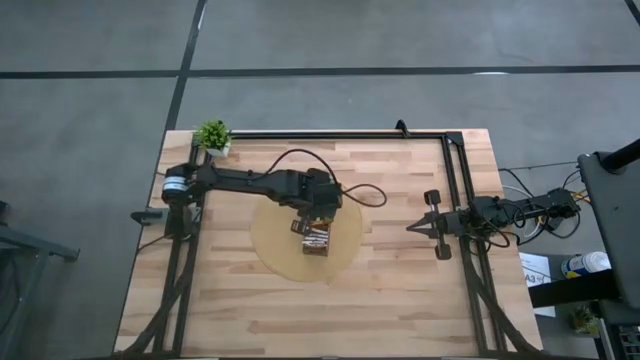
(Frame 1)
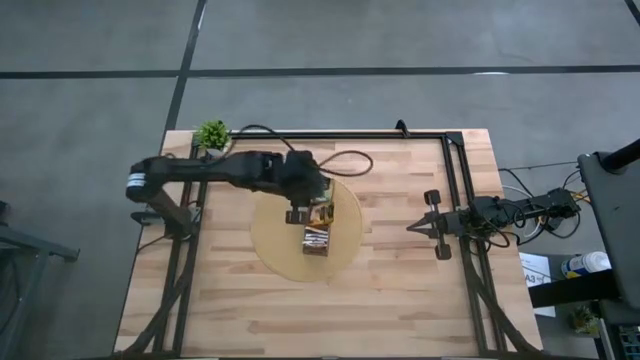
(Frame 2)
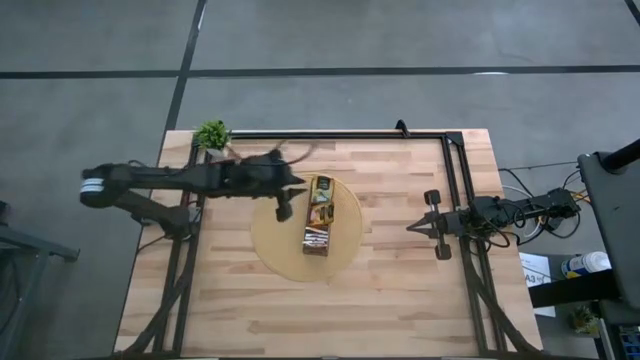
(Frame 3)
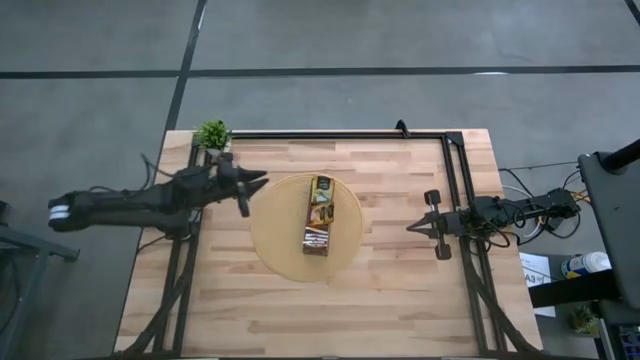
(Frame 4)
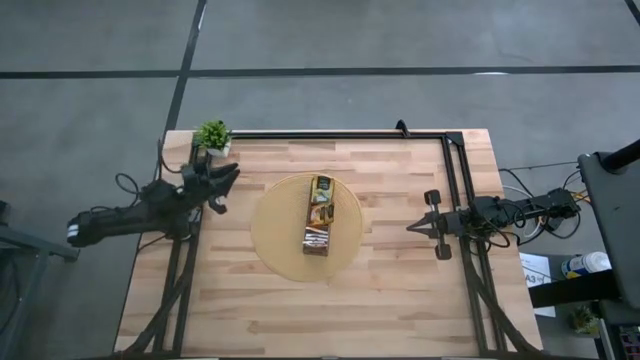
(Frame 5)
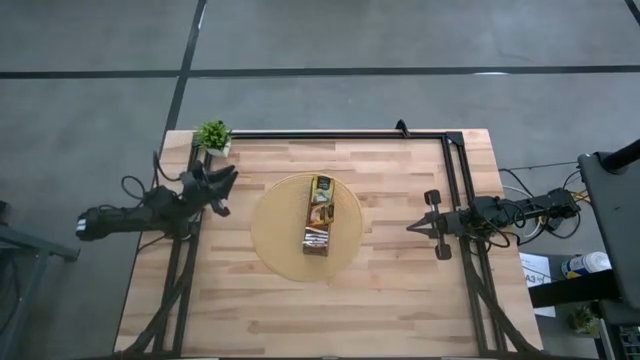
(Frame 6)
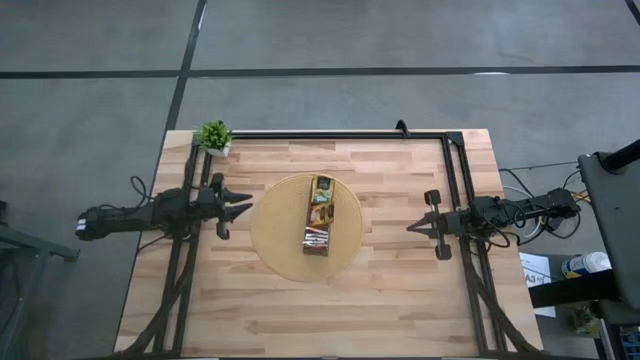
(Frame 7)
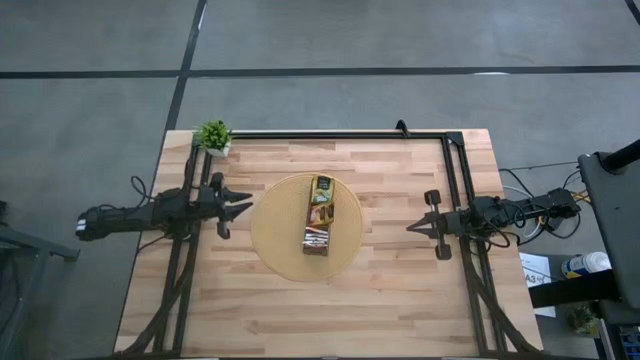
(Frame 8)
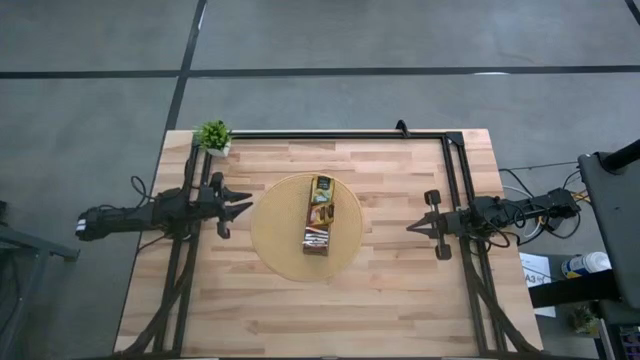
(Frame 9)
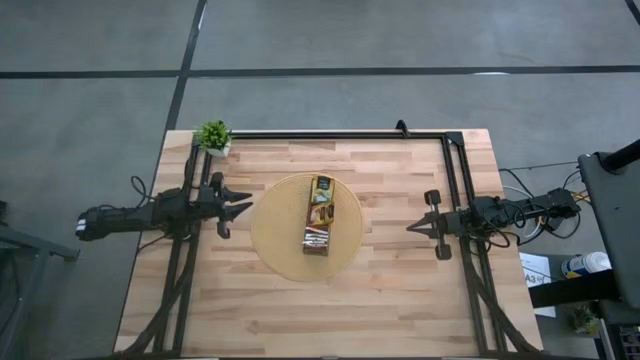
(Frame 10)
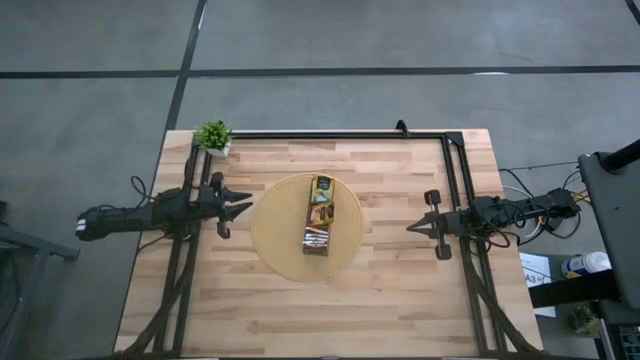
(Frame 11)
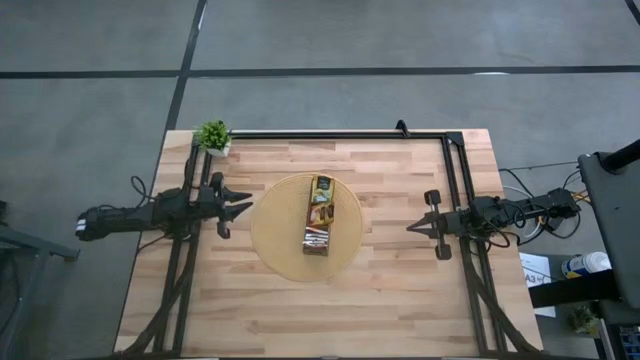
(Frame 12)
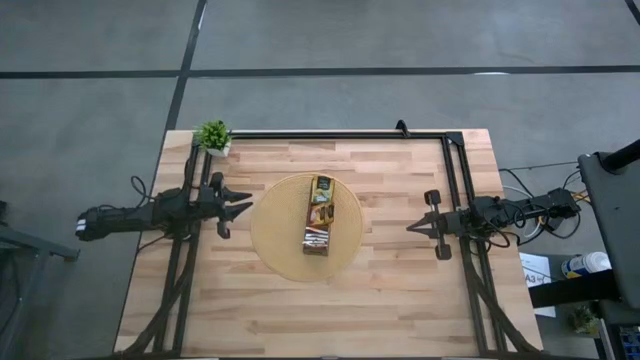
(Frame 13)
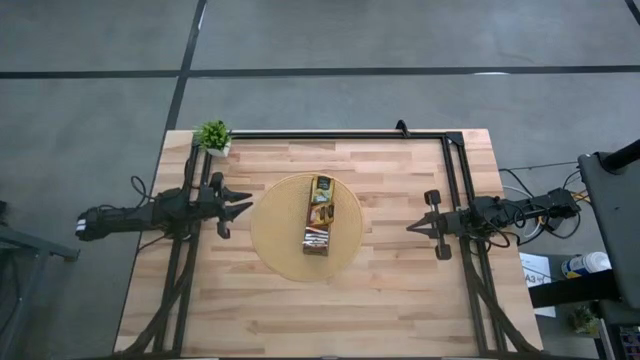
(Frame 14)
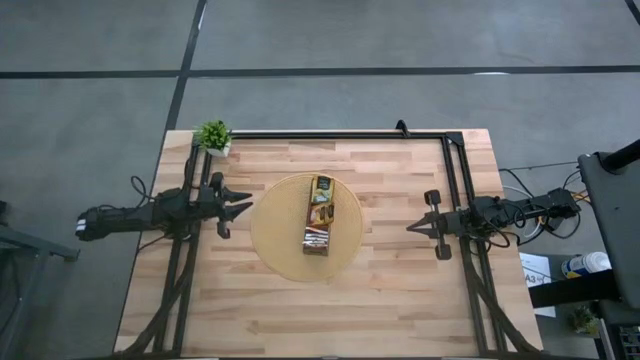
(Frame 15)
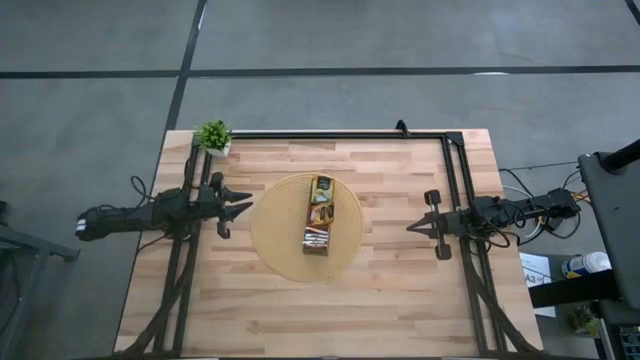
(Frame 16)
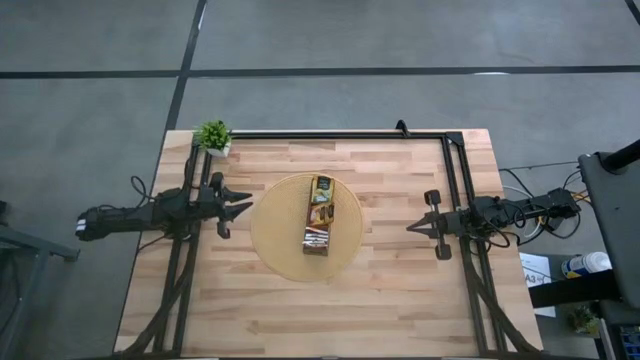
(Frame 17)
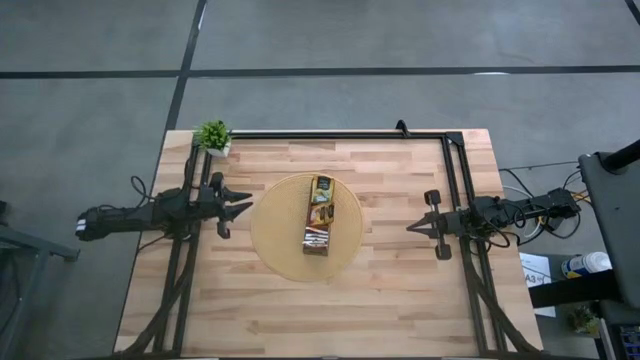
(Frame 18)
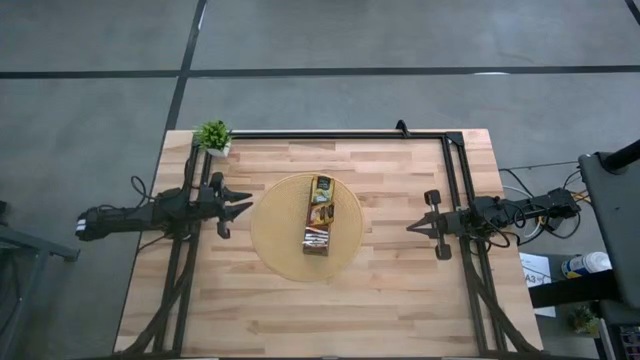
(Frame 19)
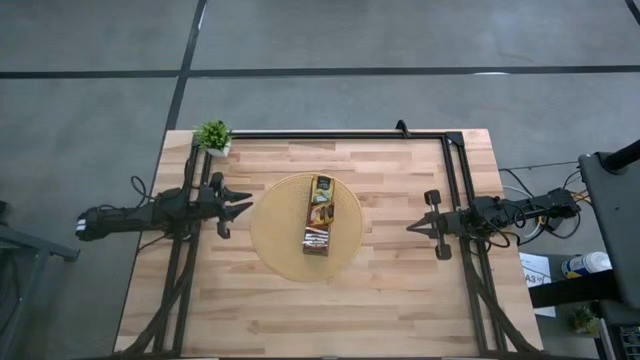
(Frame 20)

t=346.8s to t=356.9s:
Task: Pick & Place Tea
Return to Home Position

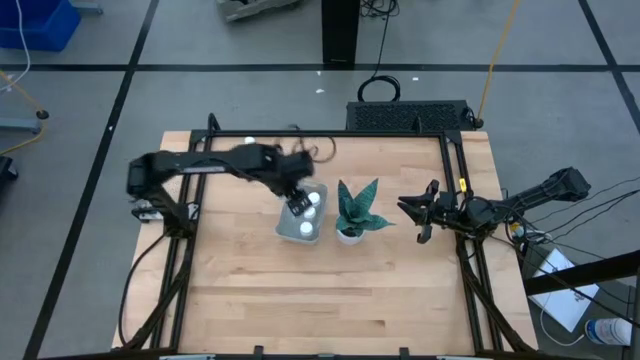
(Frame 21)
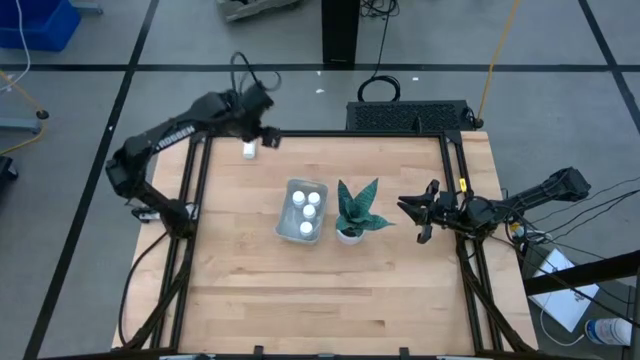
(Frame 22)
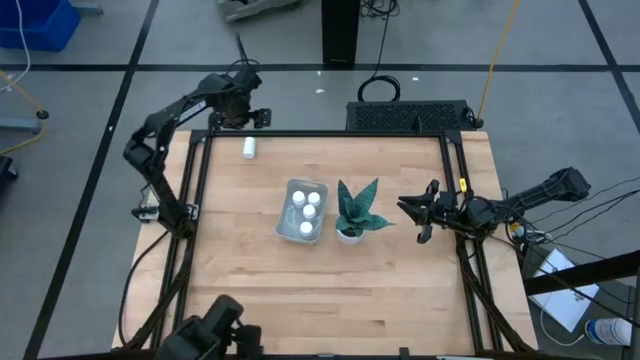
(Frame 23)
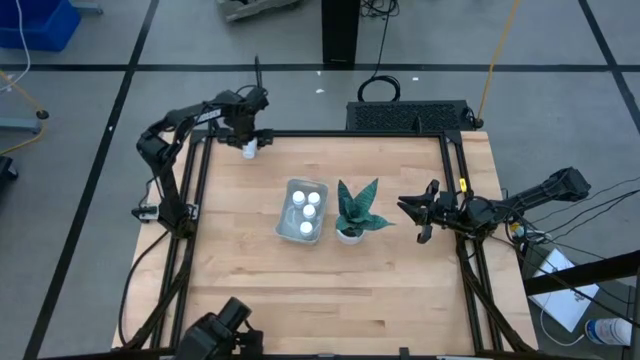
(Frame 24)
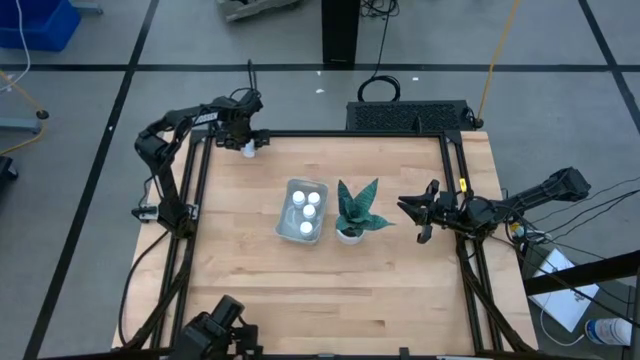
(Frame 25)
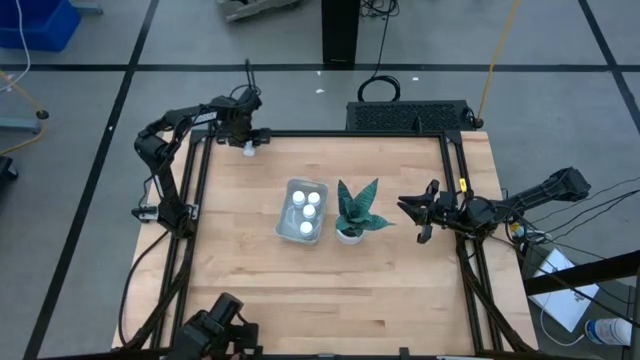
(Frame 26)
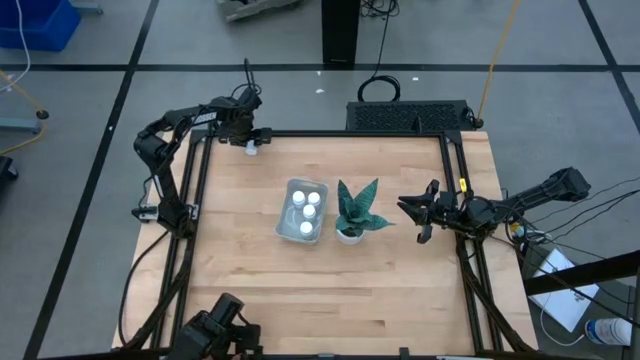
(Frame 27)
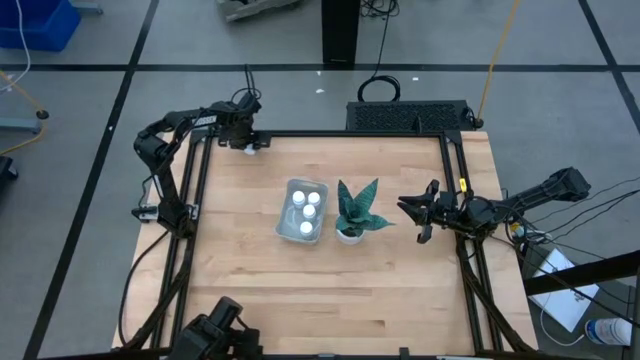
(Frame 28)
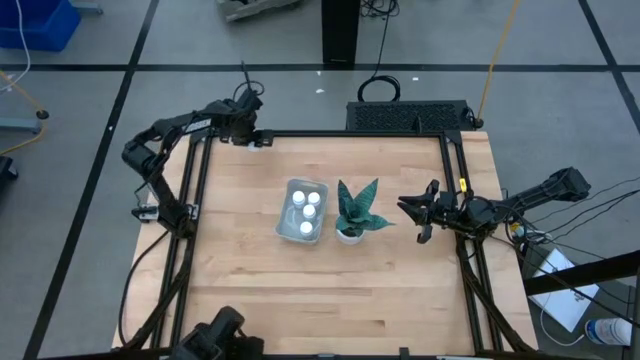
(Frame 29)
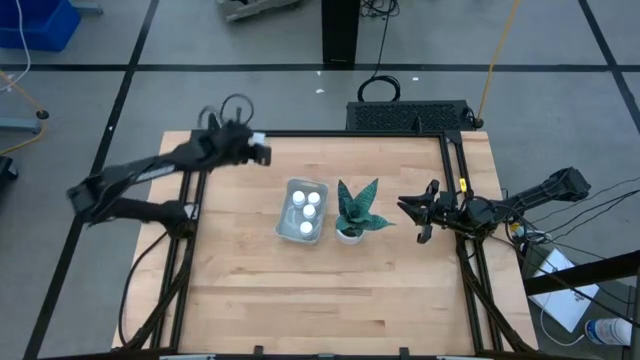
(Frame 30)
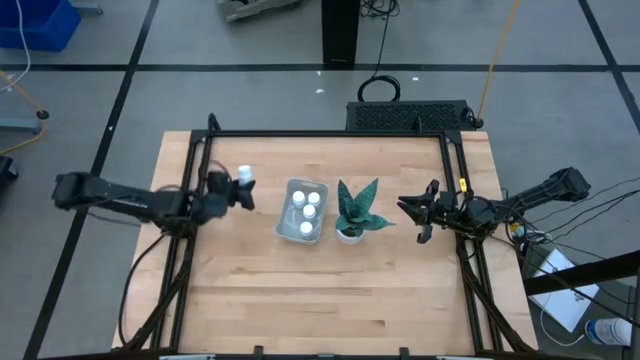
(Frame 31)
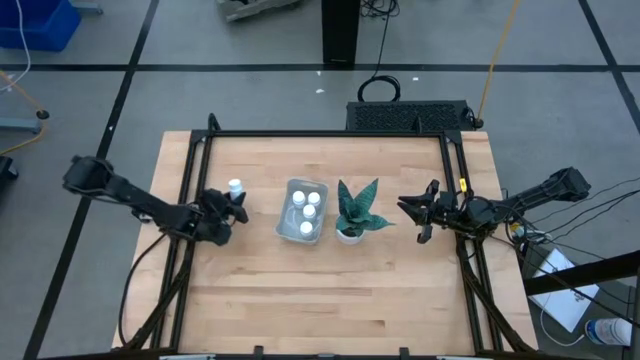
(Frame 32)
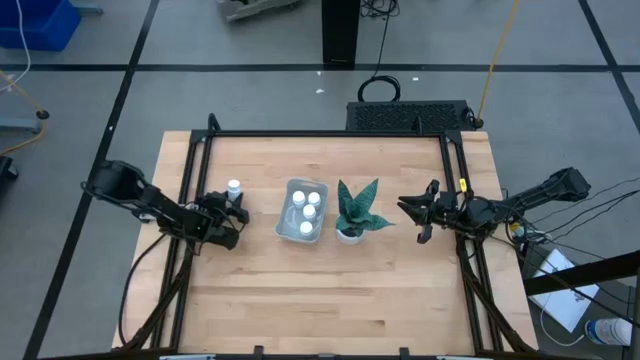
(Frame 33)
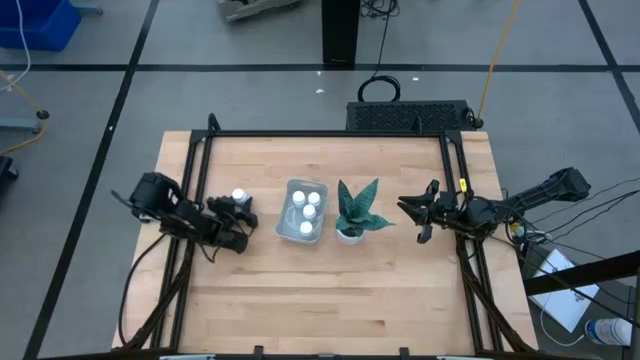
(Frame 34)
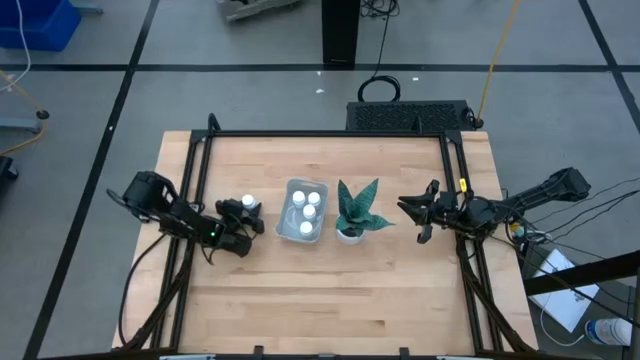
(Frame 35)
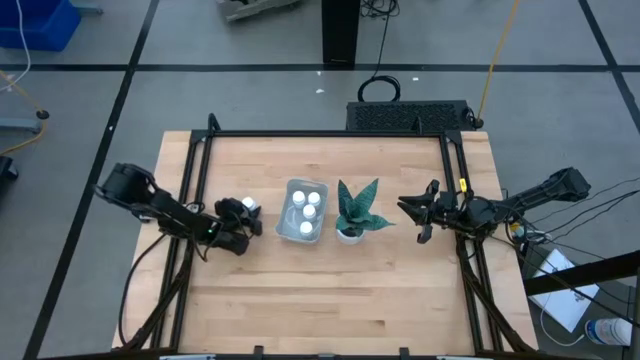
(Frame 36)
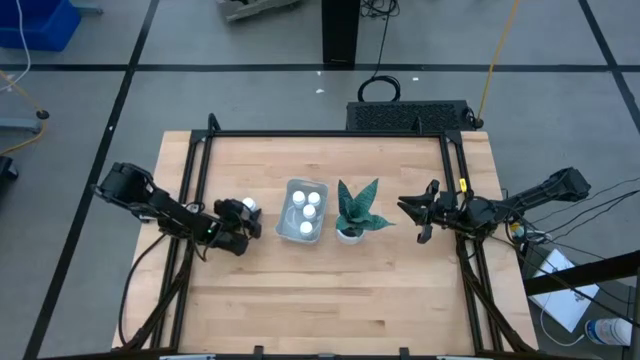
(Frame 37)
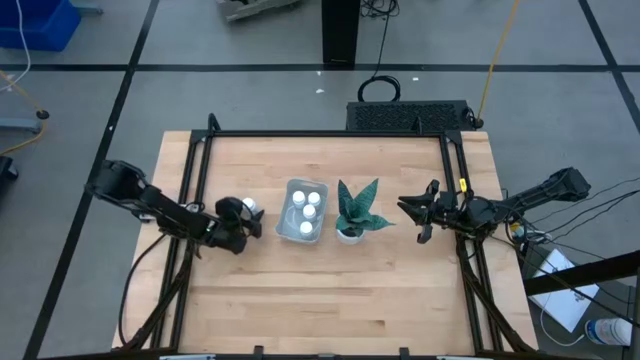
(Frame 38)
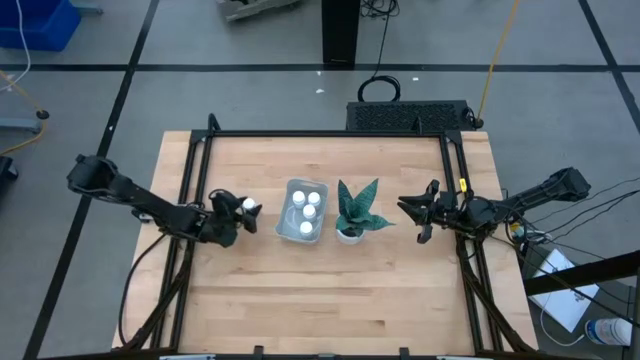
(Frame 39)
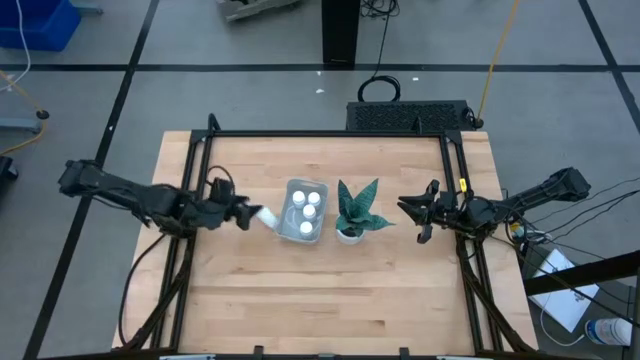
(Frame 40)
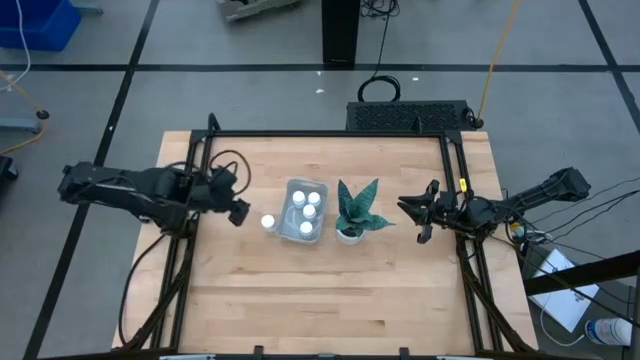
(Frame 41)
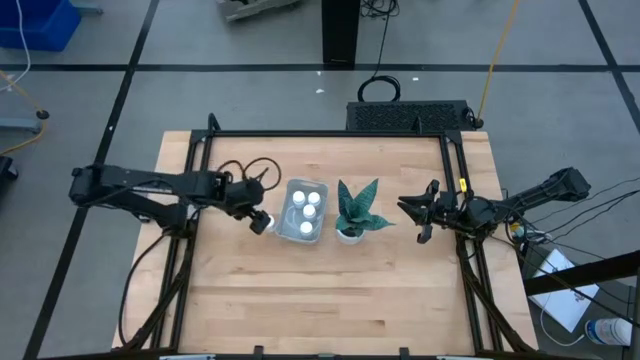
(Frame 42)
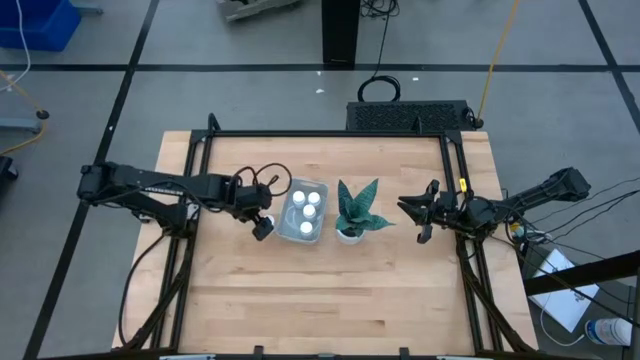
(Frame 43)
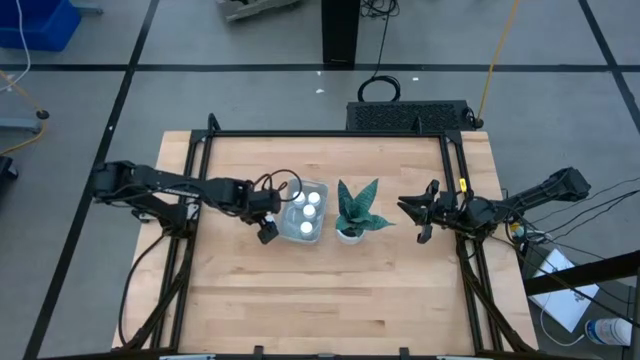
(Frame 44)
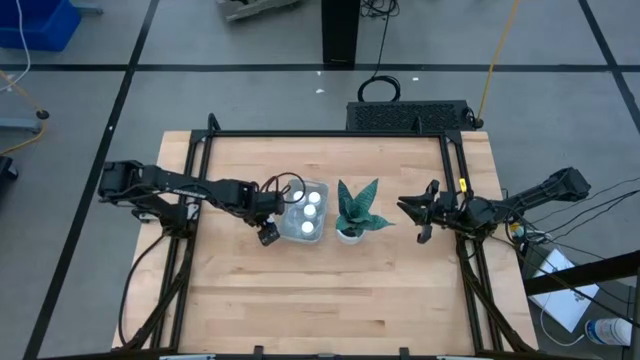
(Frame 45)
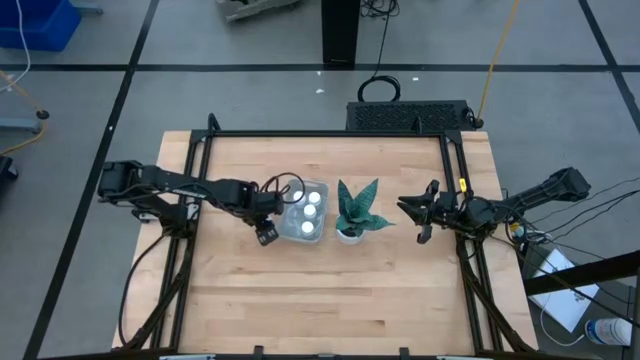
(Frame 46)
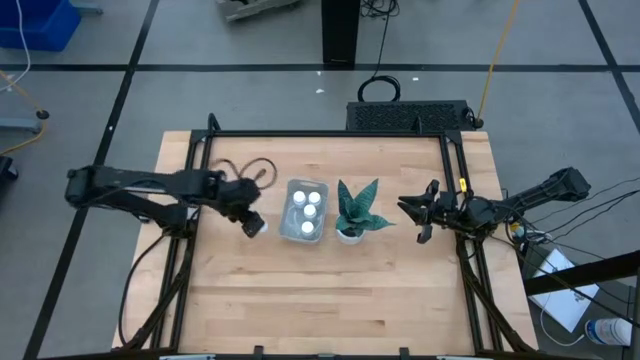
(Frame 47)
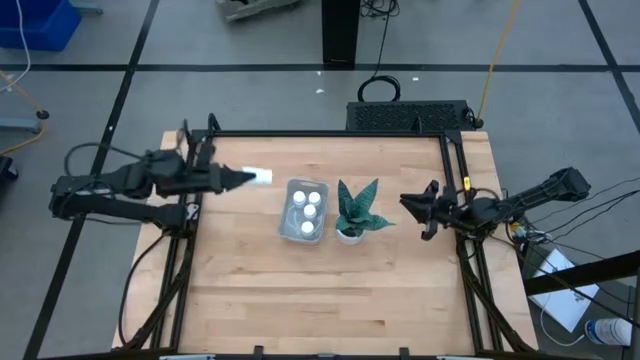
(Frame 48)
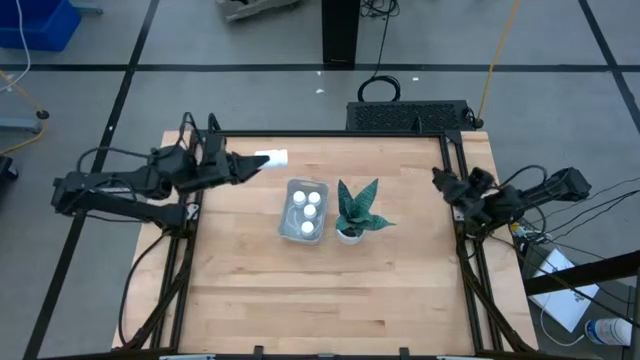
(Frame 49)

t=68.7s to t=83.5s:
Task: Pick and place pill bottles into a basket
Put the white pill bottle into the gray bin
